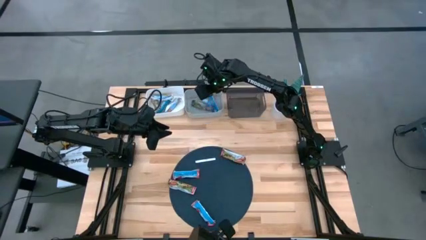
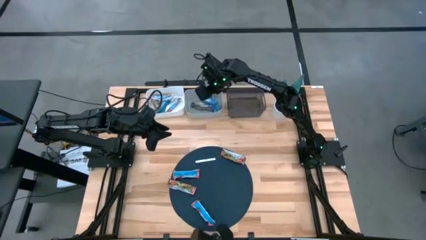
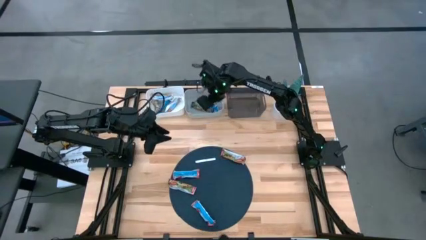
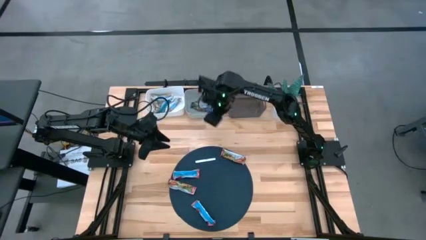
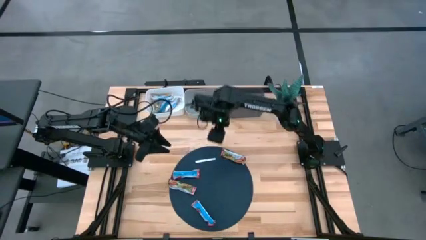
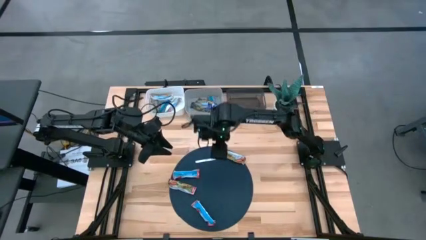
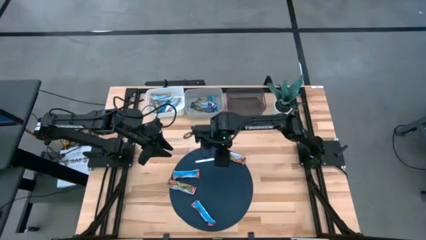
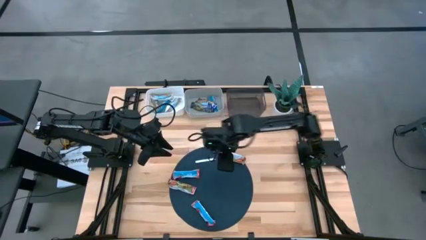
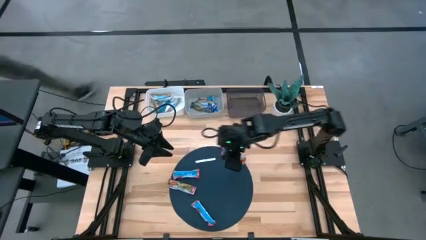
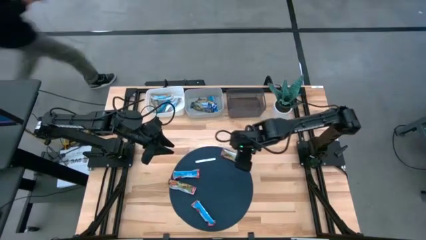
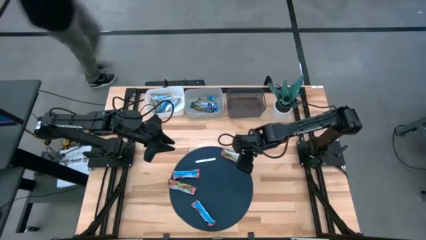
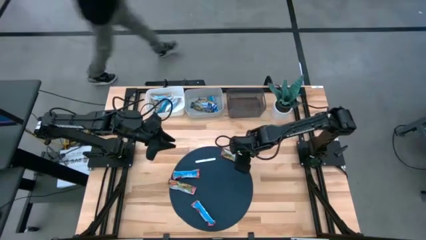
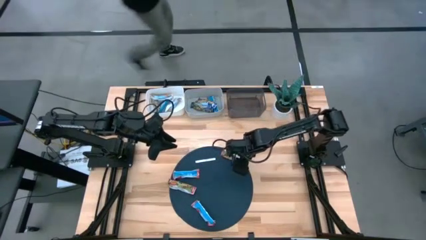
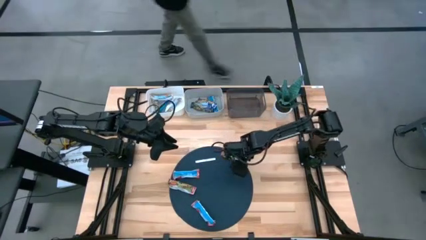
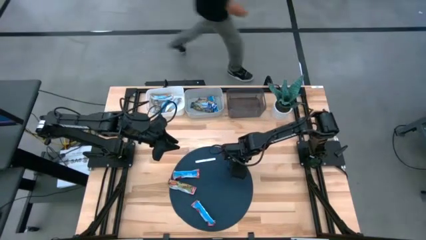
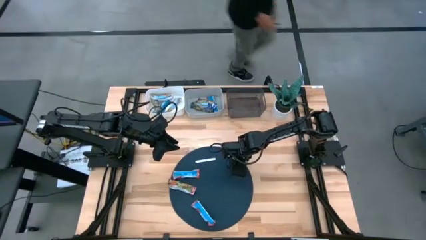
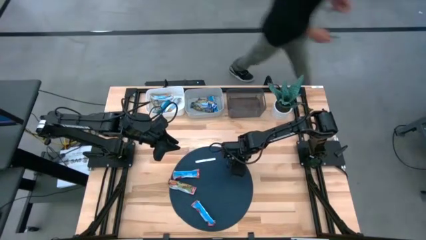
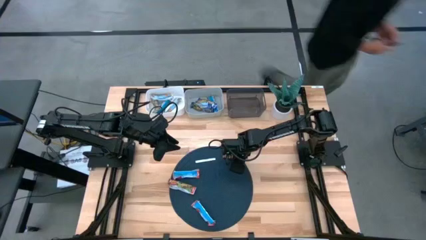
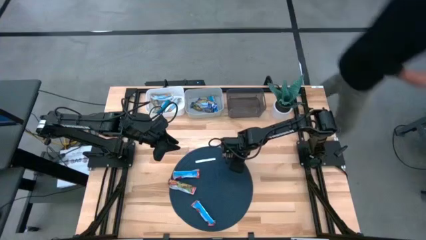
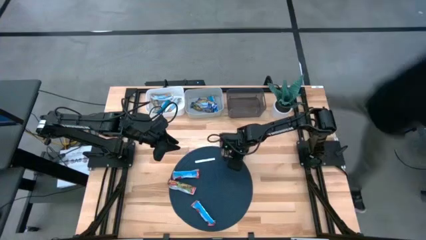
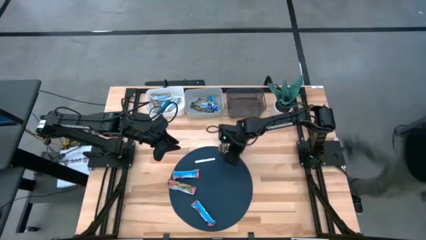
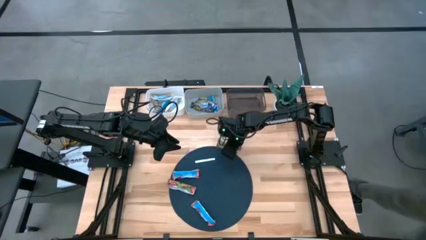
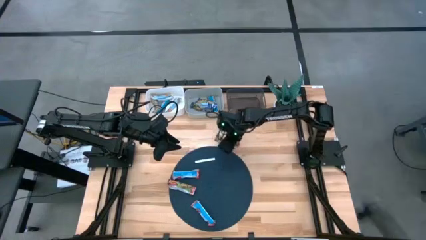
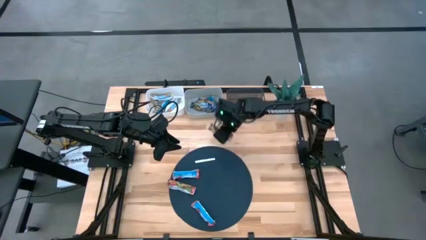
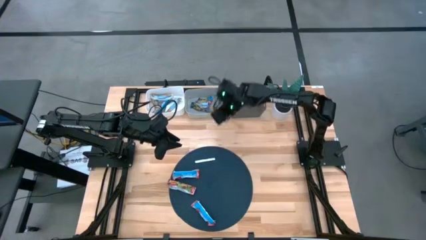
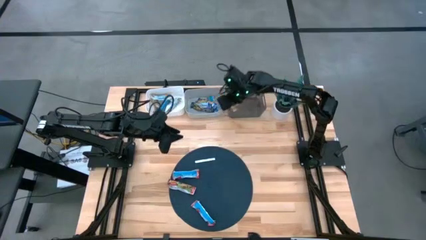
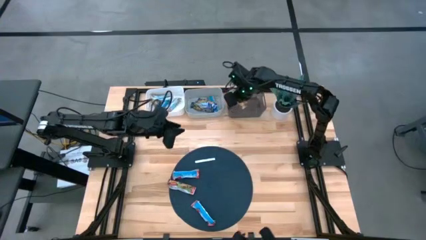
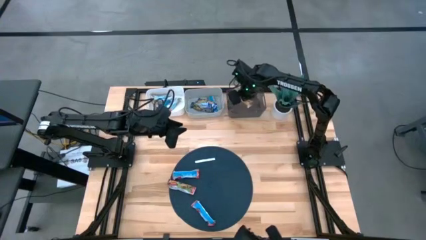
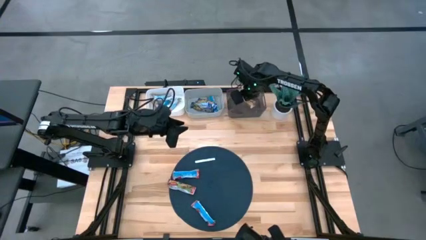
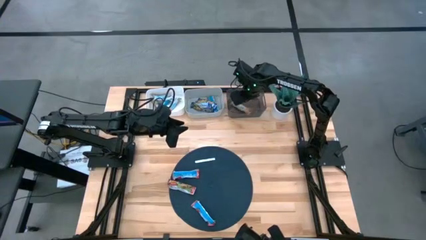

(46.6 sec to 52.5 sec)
Task: Pick and place Granola Bars by type
Put the red granola bar into the black bin

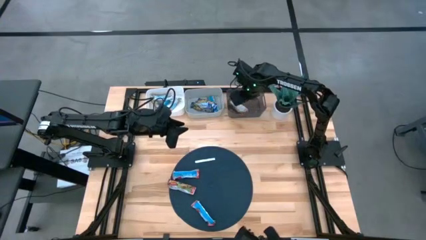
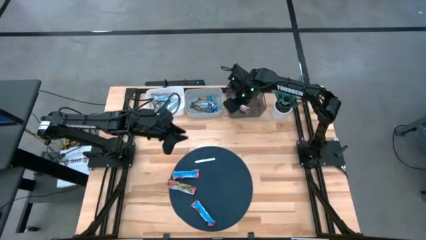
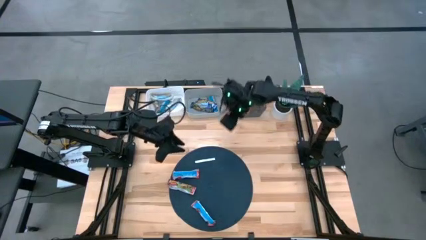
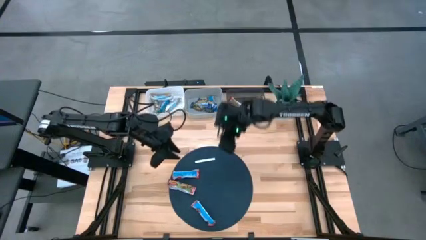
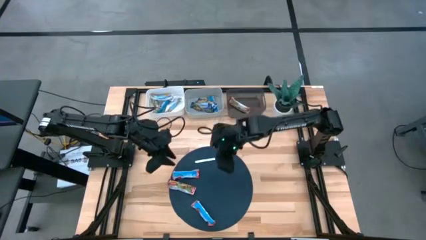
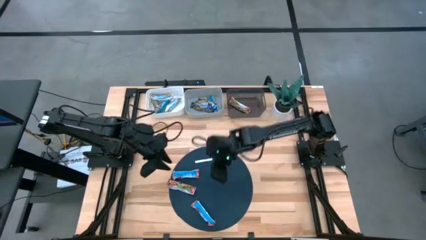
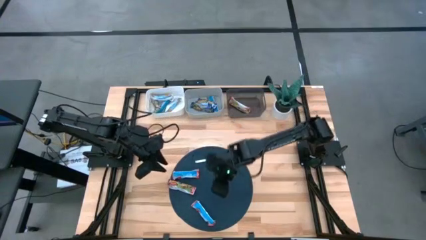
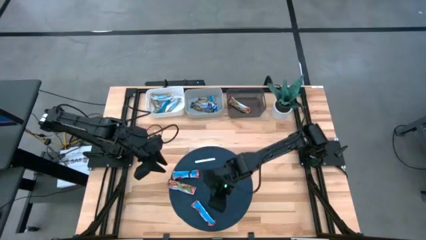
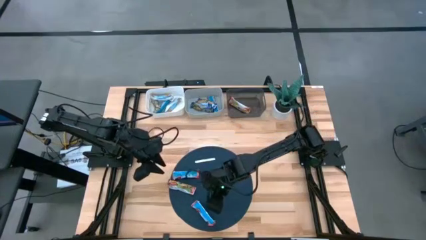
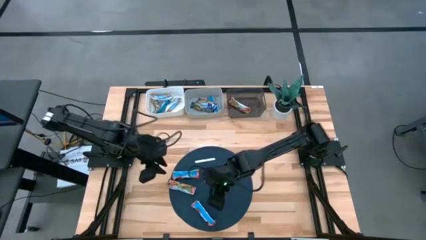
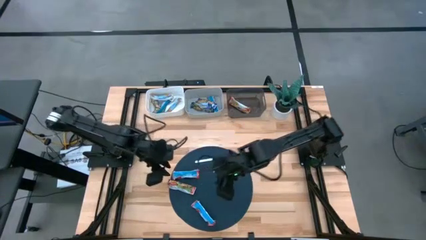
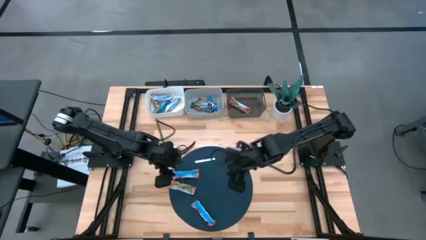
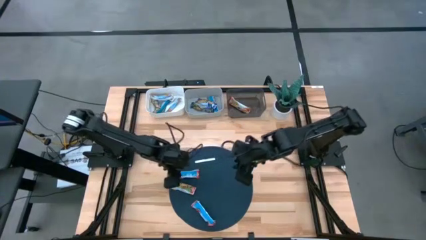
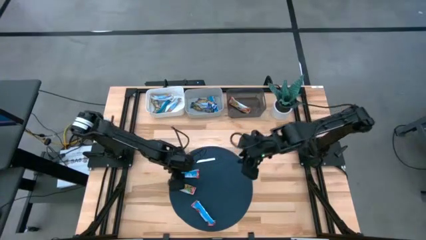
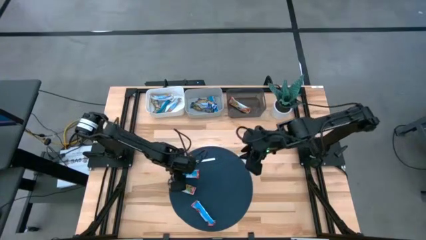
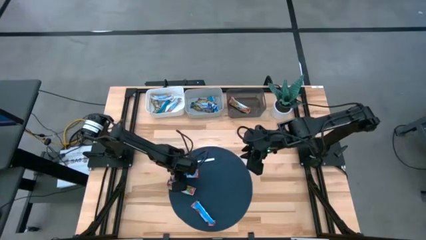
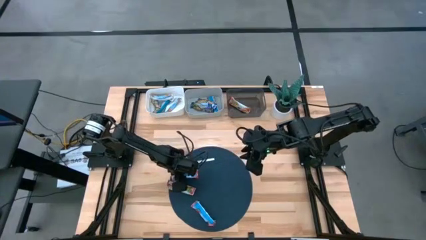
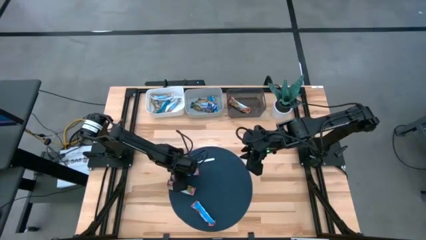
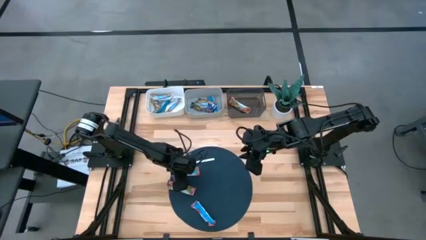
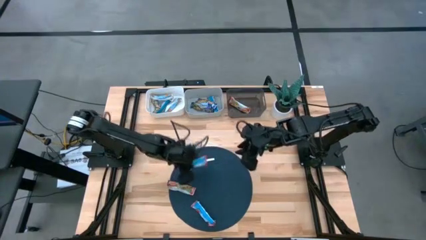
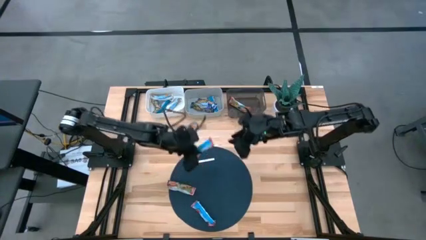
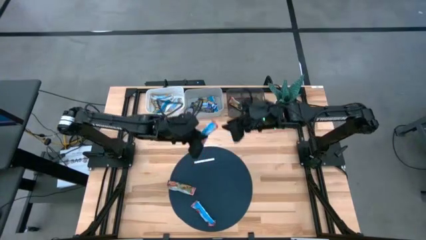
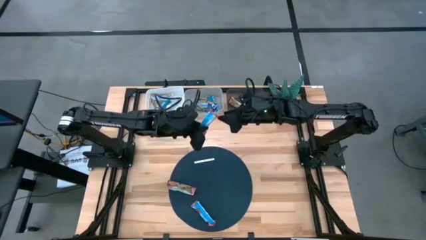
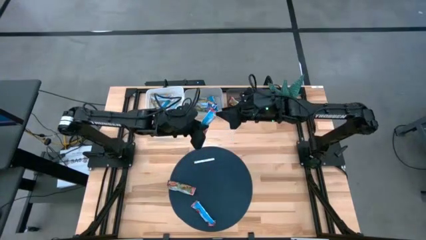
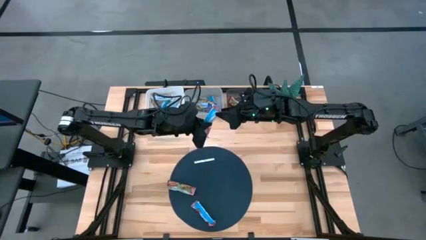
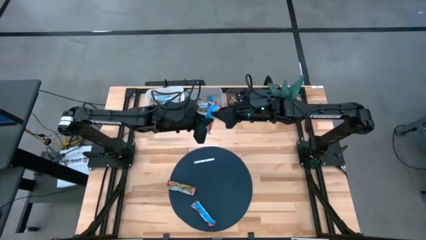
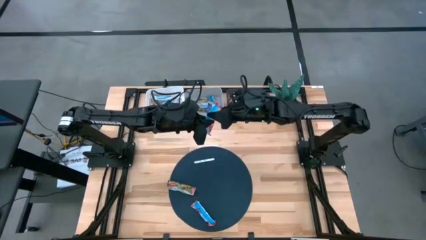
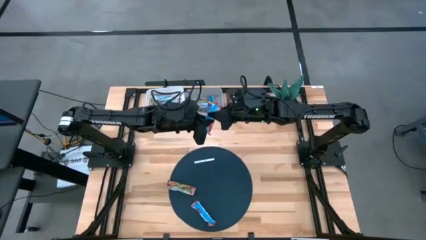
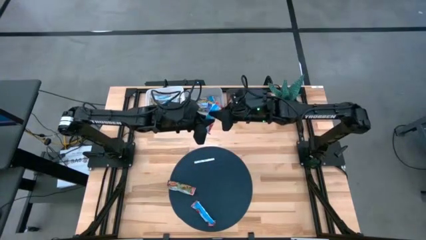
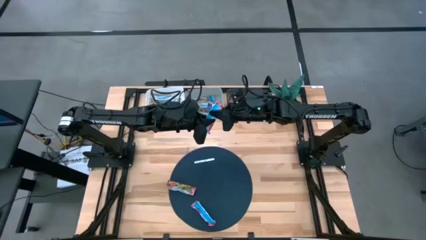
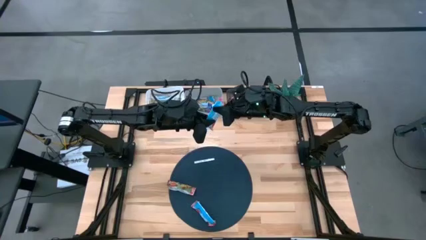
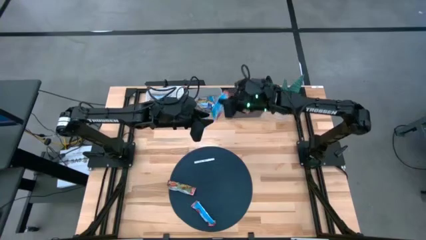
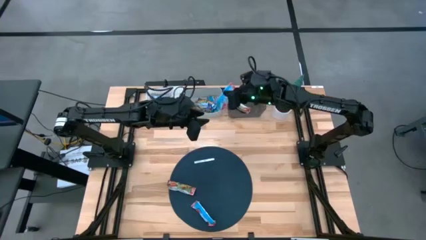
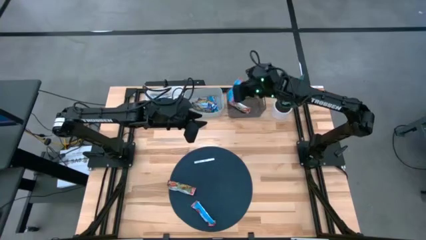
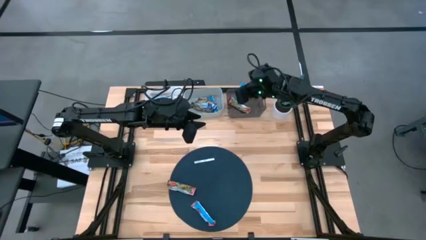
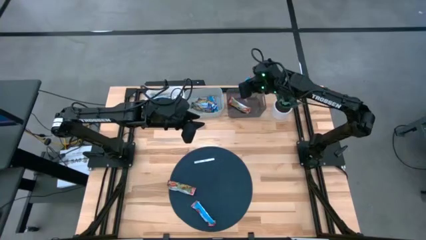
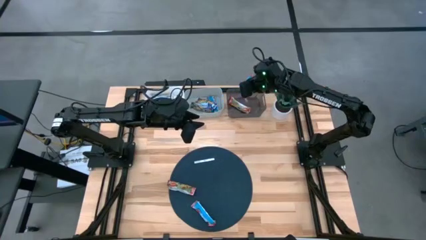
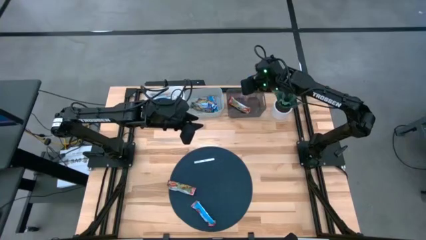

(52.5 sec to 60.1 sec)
Put the red granola bar into the black bin

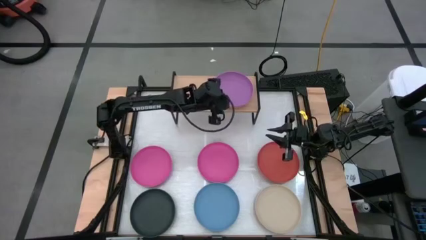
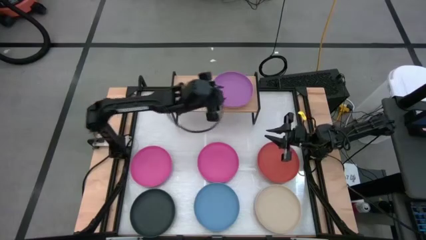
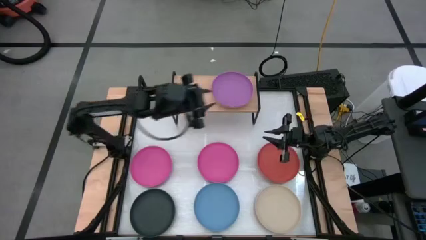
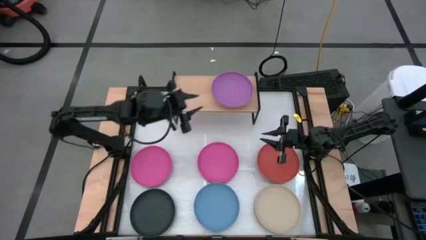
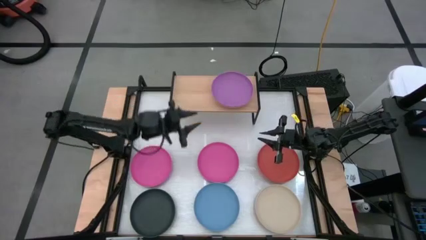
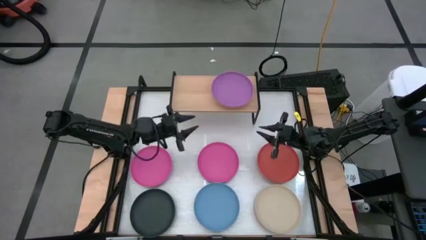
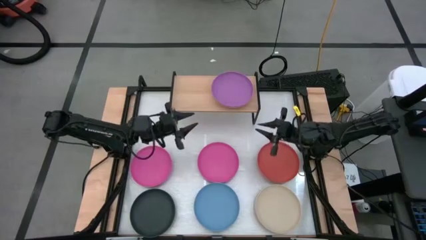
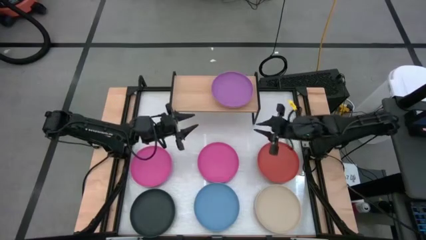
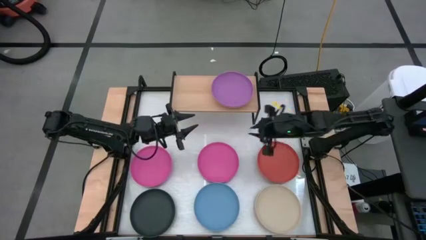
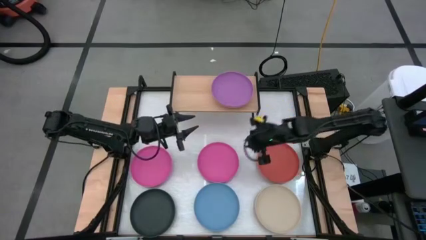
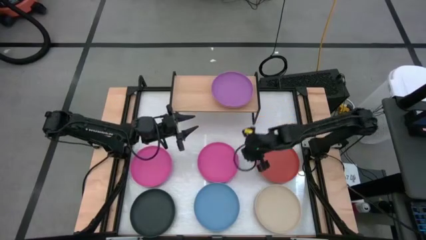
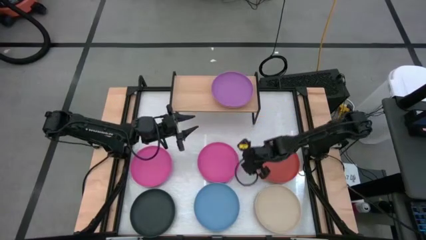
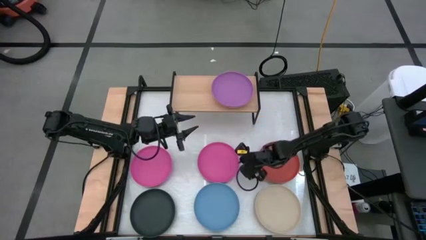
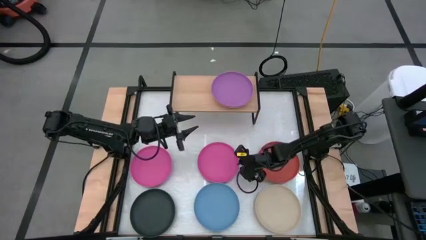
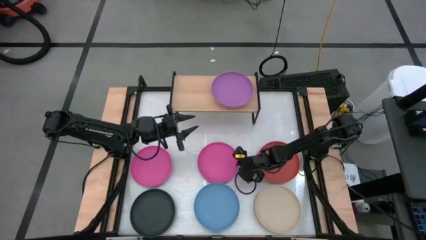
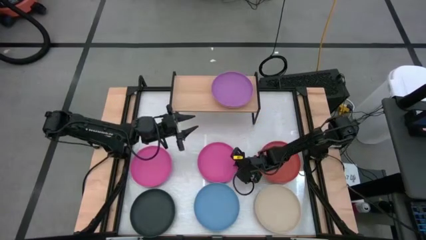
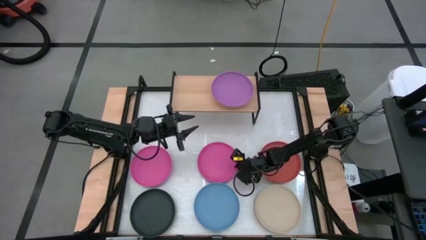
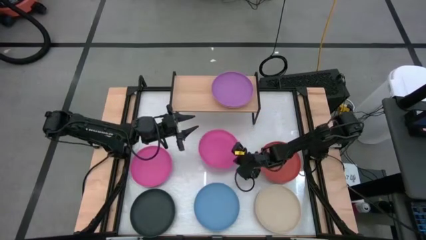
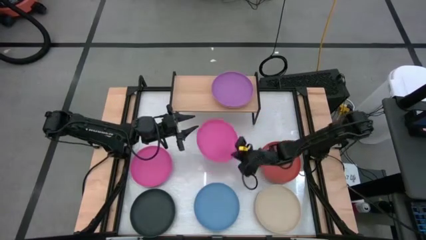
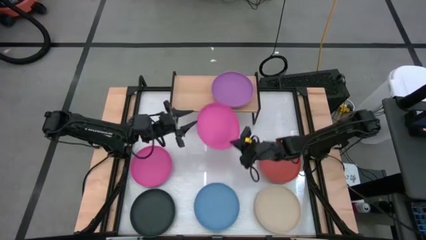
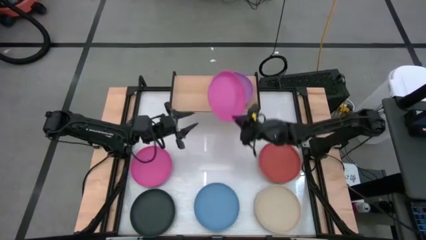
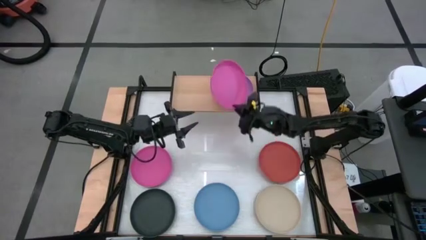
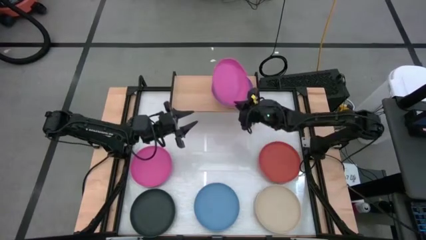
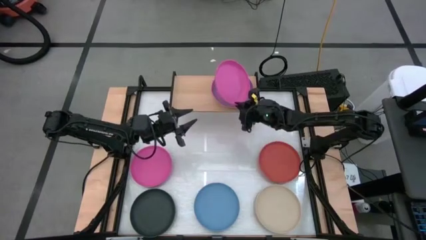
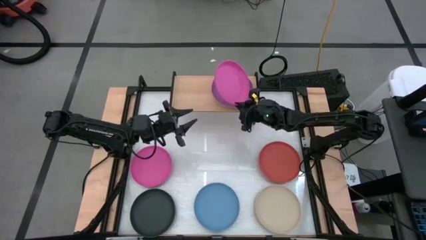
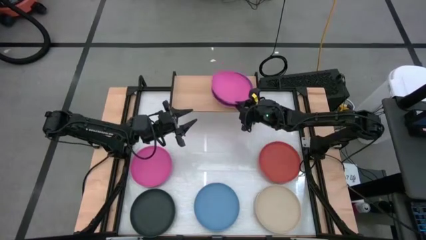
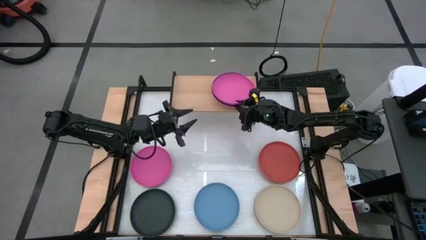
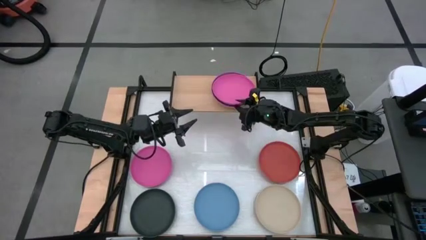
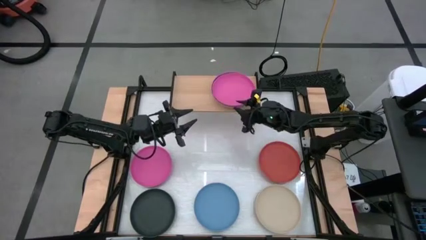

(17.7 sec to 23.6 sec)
Task: Place and stack plates onto a shelf
Stack the light pink plate on top of the purple plate
